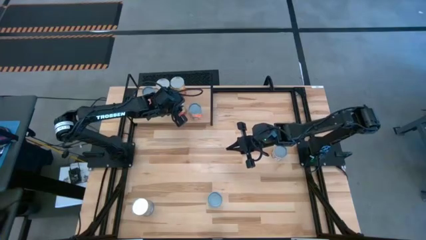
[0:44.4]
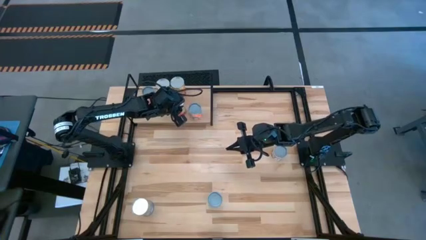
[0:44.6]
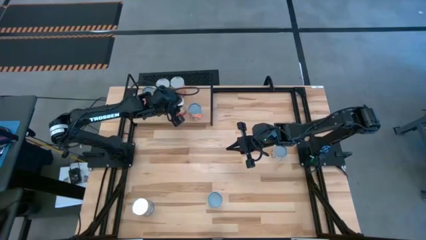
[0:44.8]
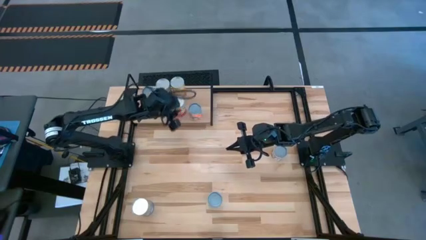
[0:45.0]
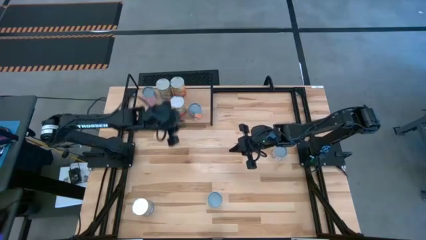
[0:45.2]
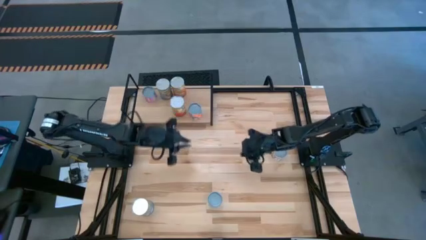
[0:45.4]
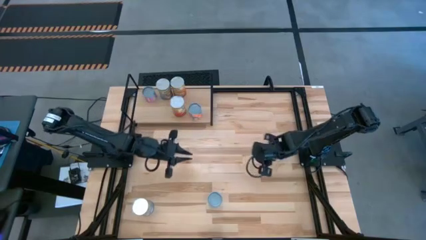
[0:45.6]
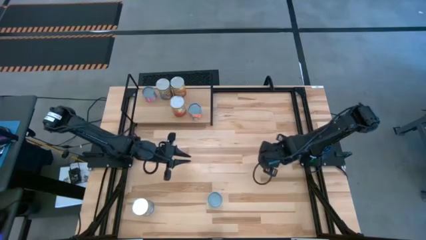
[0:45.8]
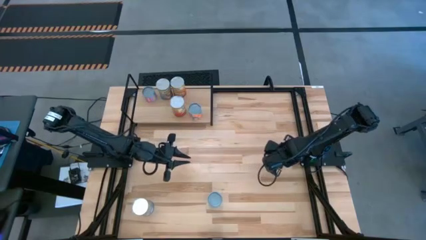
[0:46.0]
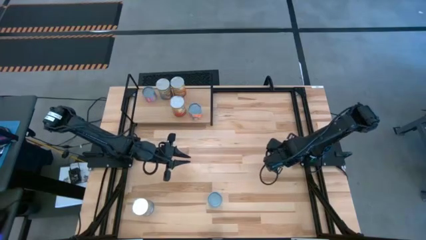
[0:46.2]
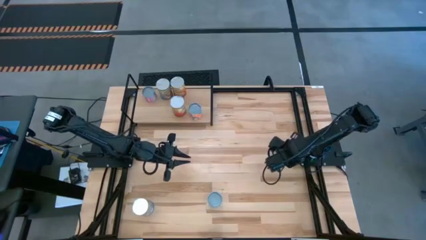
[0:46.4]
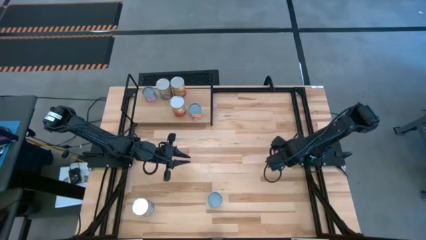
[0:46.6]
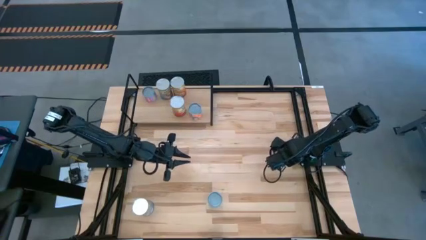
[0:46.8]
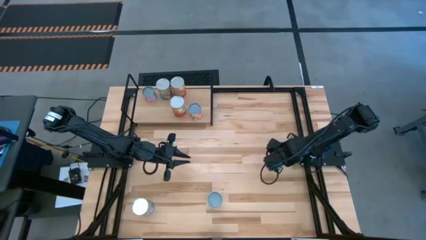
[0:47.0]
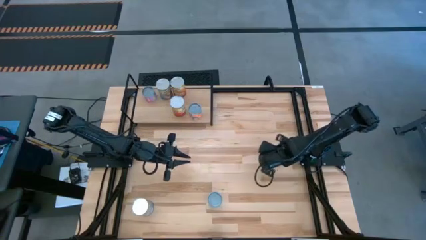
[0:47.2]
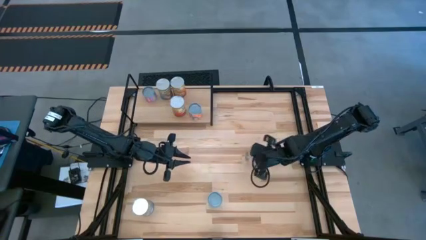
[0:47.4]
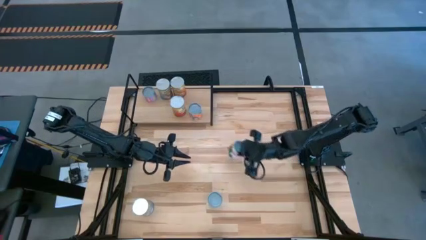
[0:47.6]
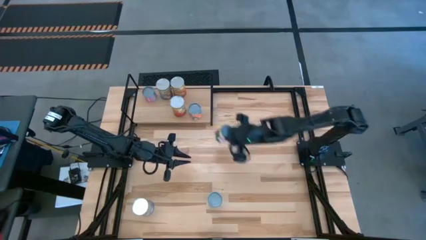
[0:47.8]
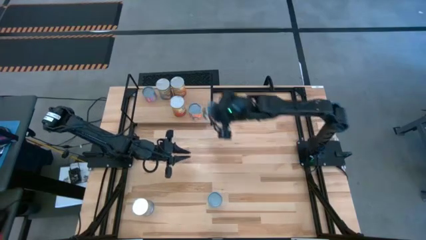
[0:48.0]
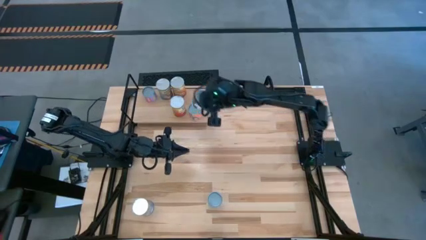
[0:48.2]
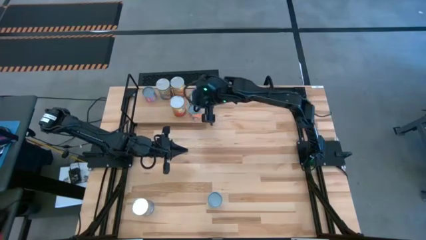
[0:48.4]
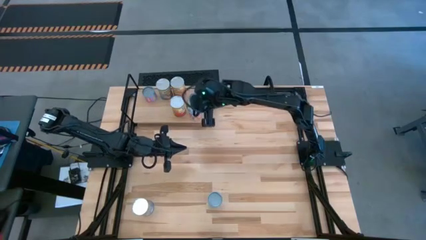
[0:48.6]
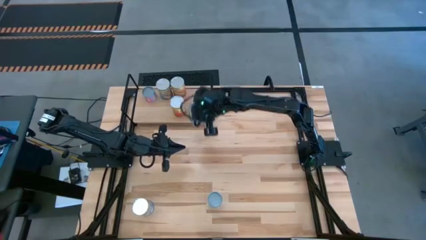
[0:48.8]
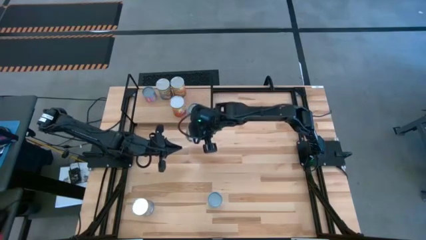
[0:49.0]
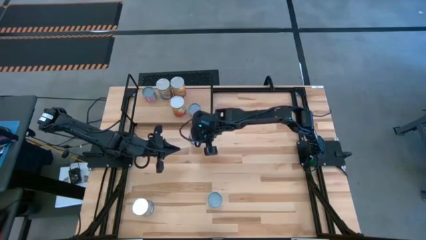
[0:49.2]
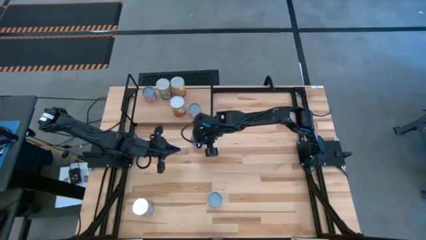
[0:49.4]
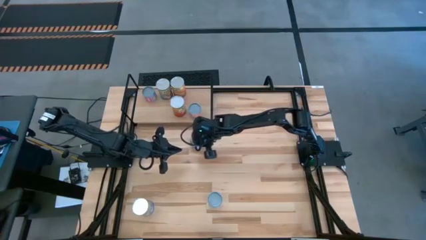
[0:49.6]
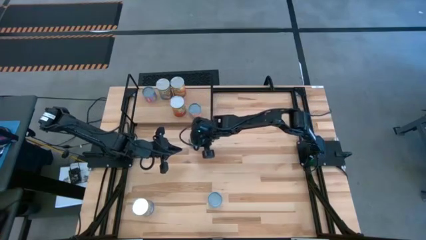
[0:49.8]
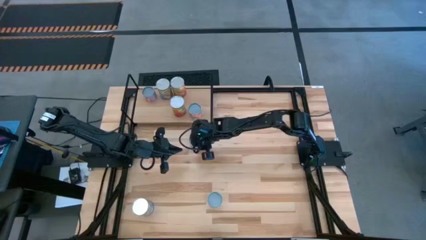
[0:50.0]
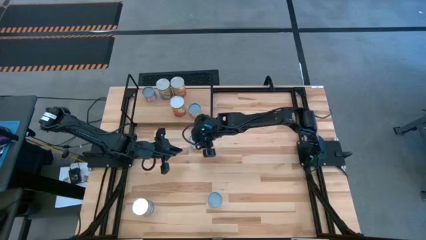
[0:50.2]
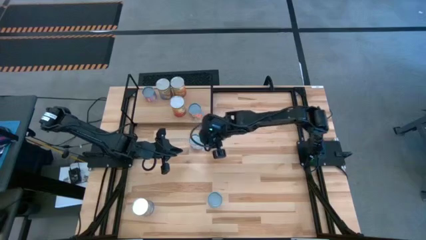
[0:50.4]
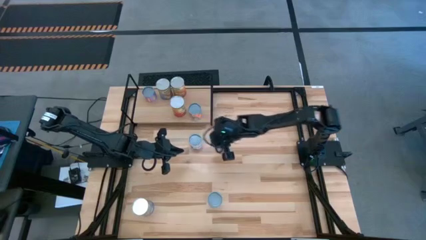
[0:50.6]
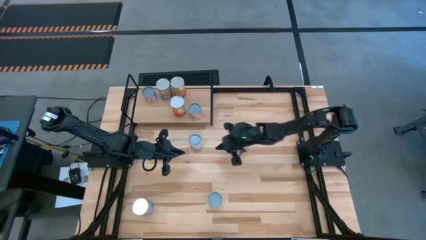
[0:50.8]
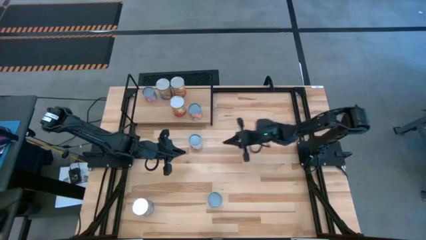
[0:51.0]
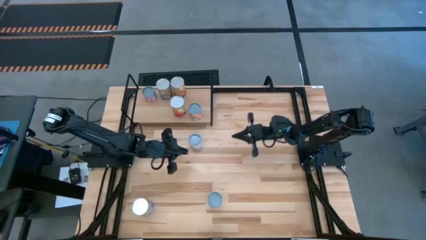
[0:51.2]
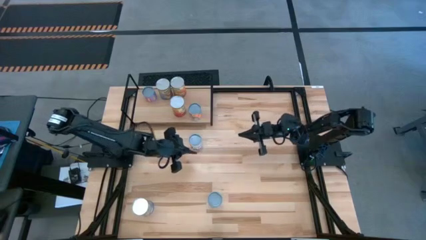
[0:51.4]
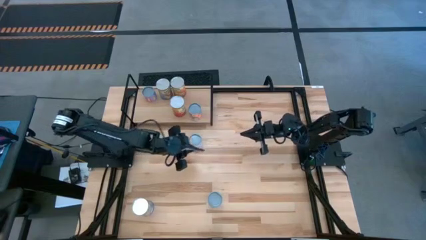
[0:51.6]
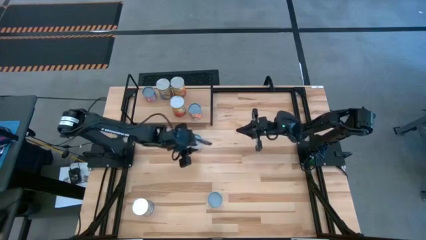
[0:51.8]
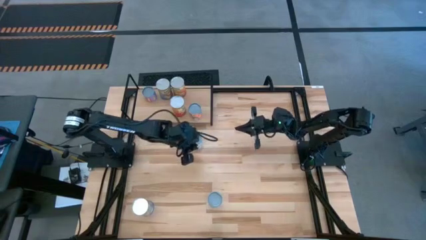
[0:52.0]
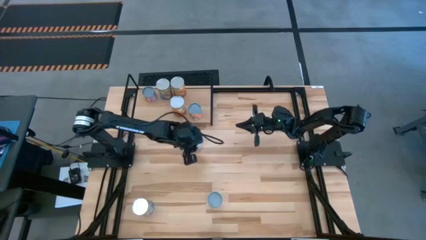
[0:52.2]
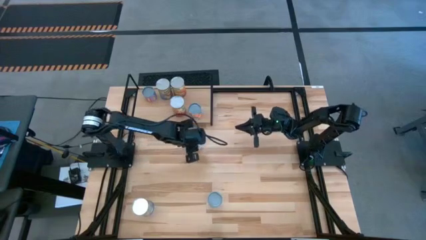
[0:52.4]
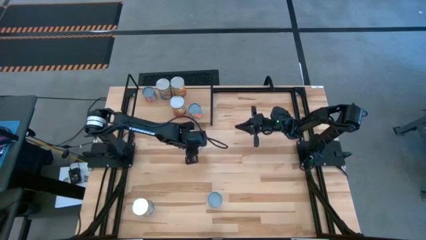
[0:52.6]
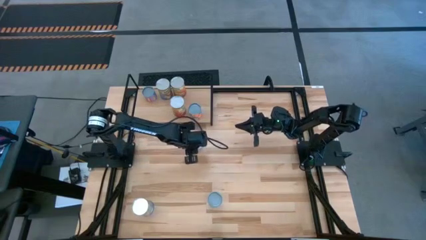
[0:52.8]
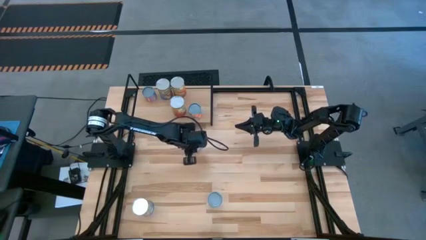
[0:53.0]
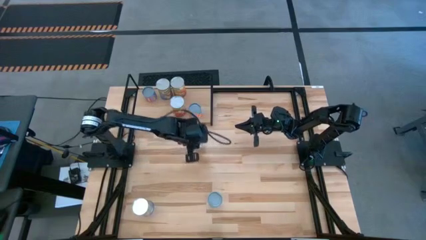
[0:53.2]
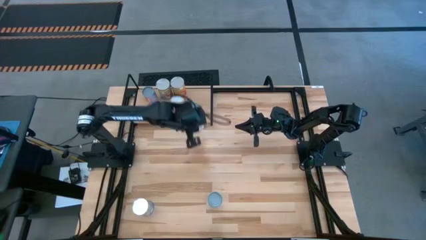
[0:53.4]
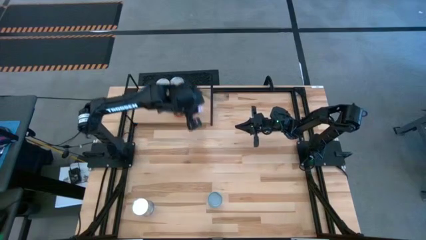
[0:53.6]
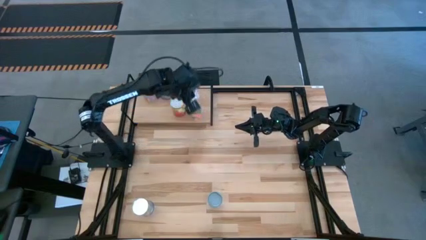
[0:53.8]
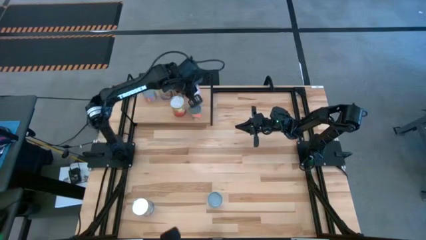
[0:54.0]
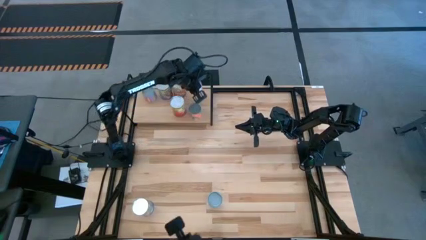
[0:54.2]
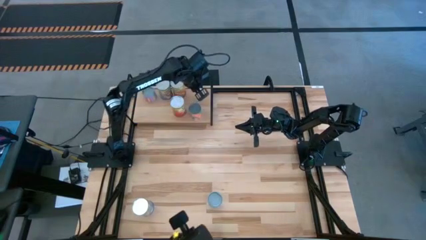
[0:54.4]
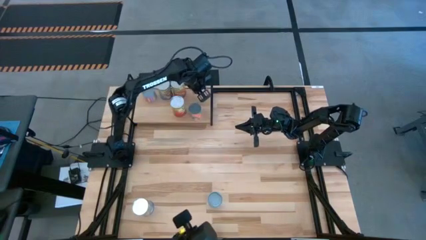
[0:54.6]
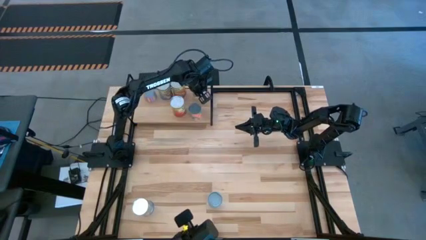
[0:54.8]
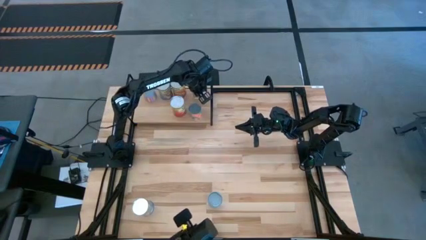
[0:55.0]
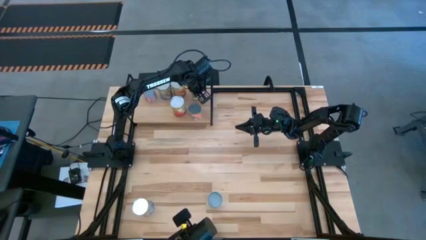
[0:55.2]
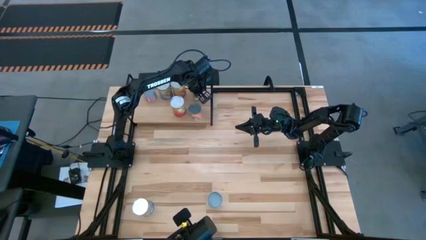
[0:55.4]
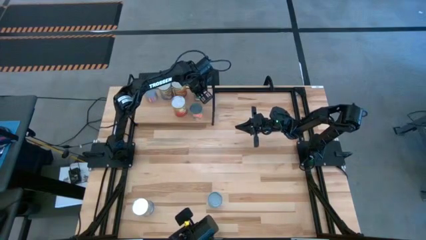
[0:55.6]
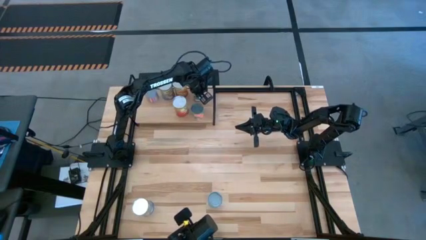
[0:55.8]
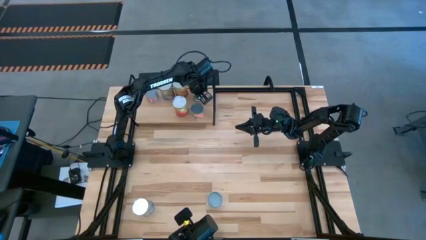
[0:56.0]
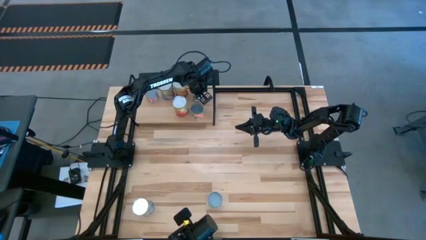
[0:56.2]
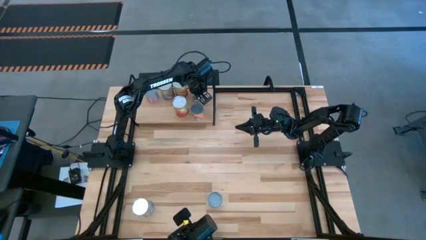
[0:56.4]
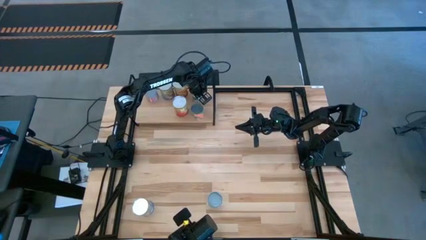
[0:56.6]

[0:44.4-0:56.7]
Task: Pick and place cans onto a shelf
Put the canned green peas on the shelf
